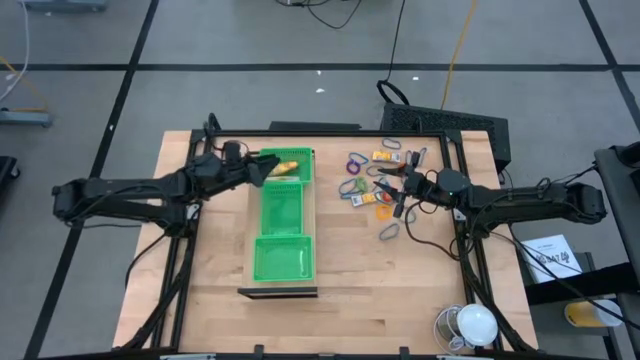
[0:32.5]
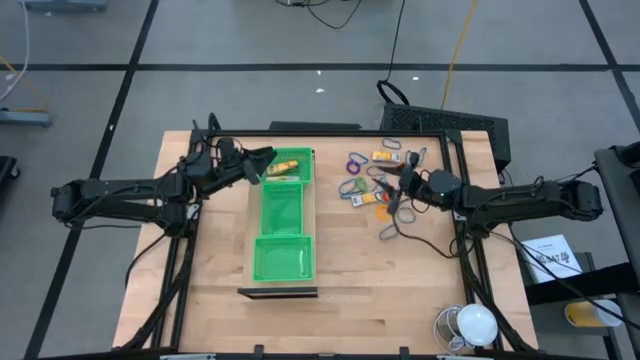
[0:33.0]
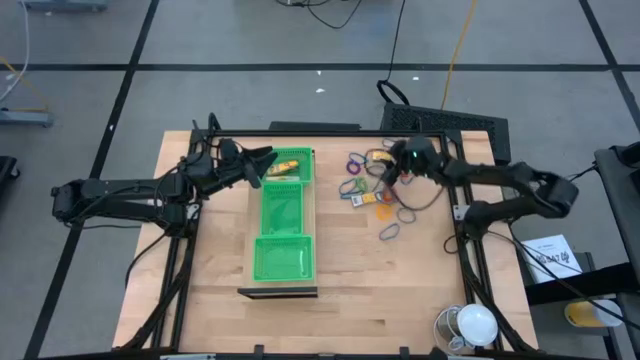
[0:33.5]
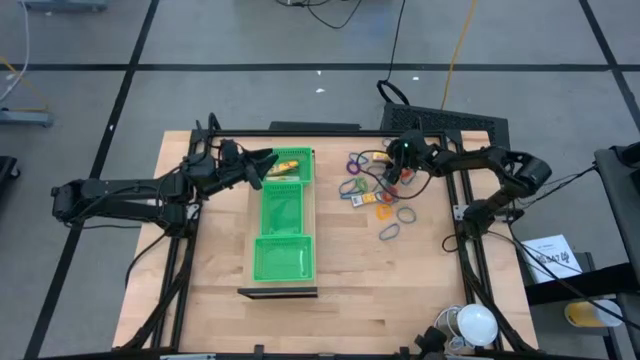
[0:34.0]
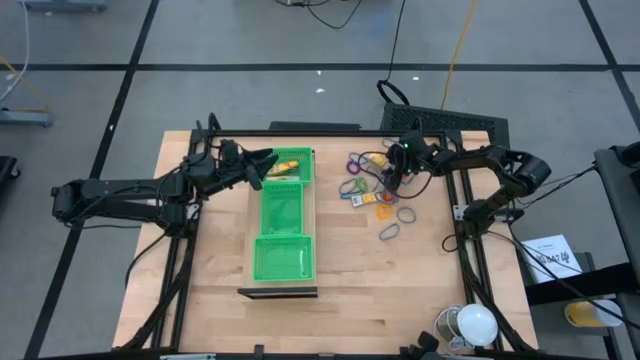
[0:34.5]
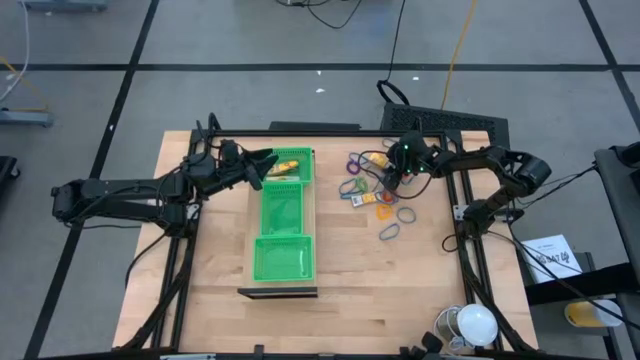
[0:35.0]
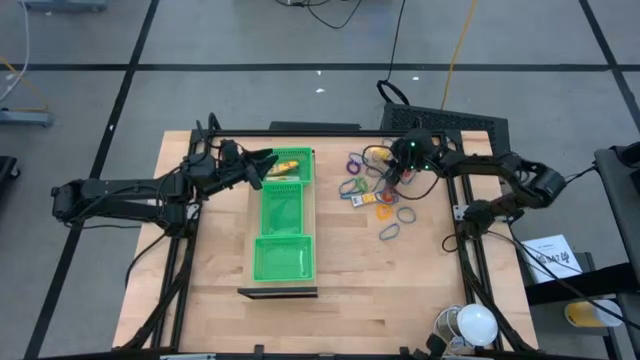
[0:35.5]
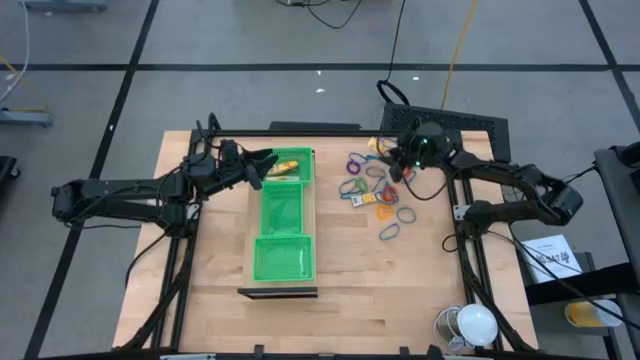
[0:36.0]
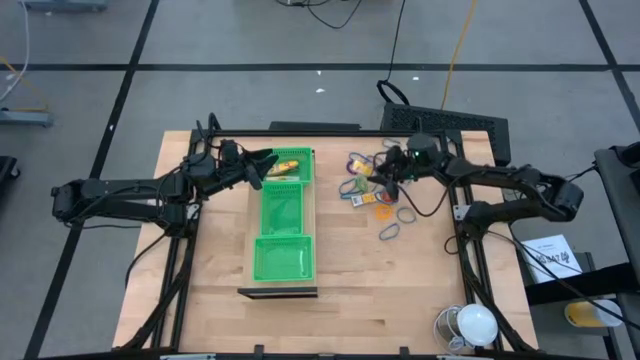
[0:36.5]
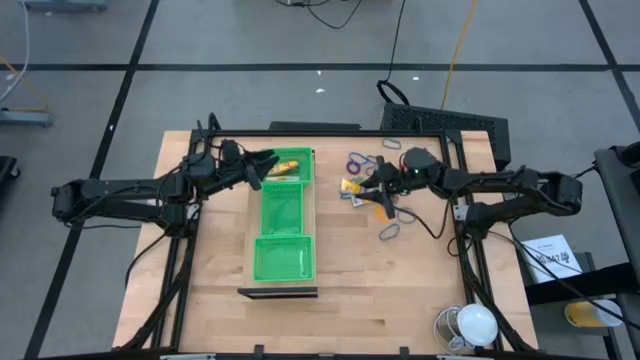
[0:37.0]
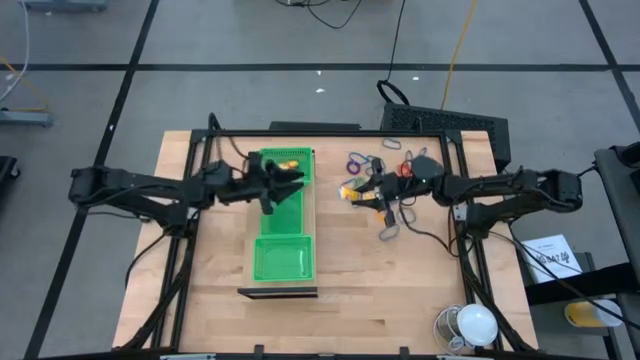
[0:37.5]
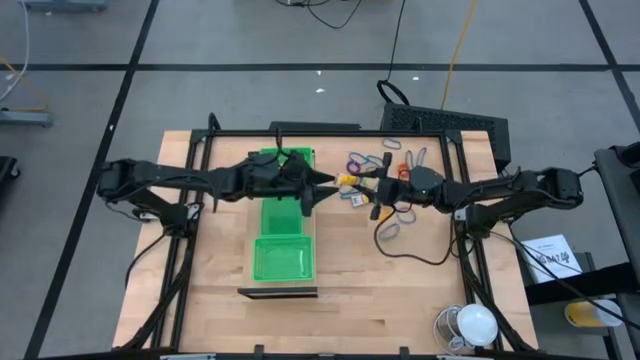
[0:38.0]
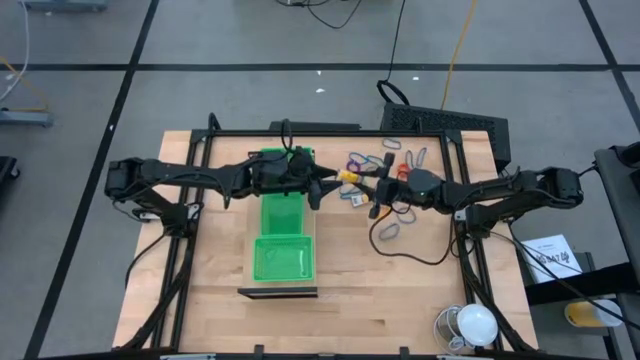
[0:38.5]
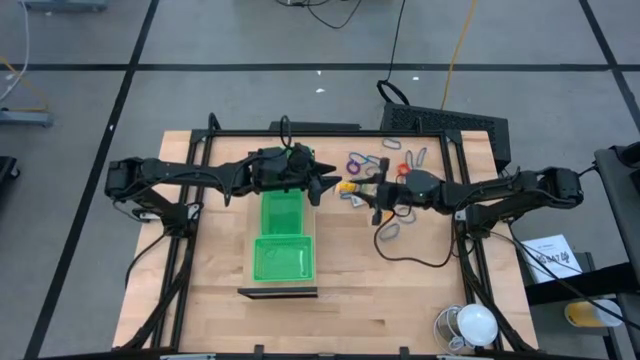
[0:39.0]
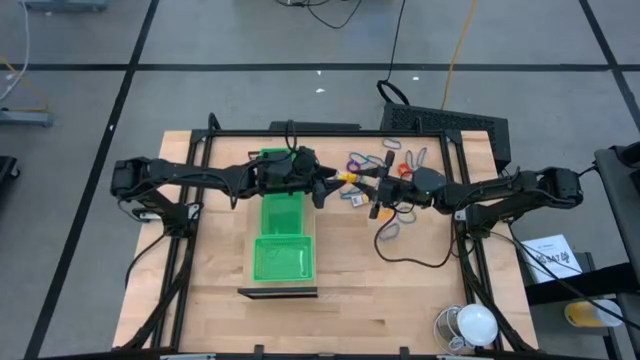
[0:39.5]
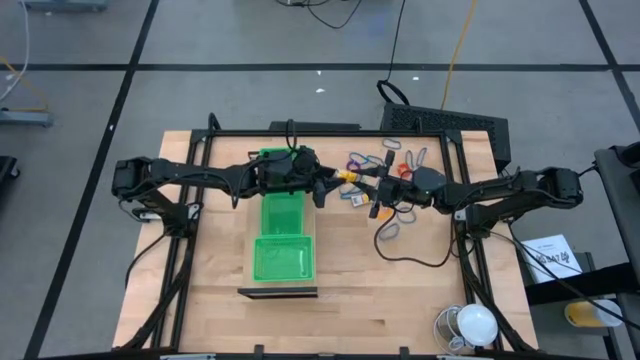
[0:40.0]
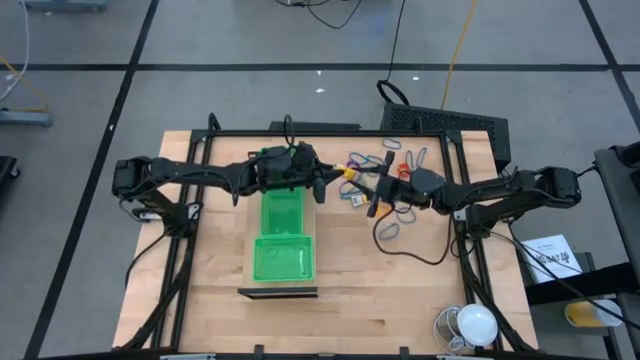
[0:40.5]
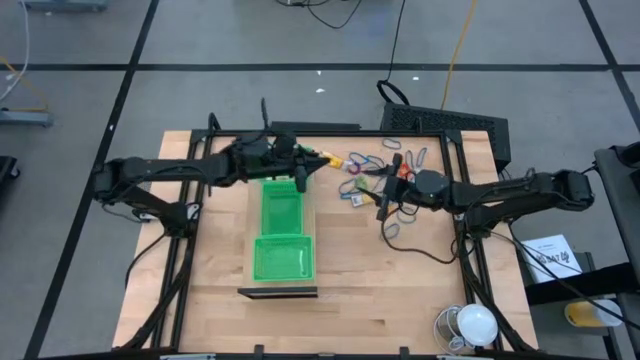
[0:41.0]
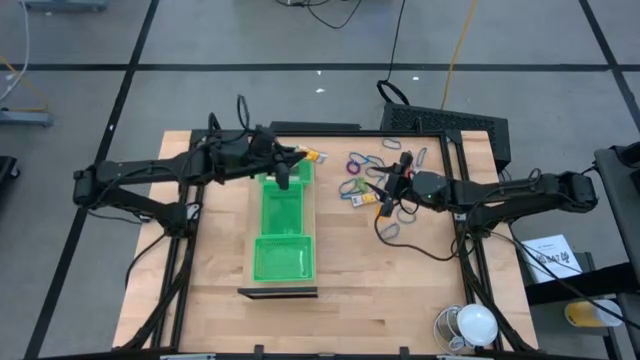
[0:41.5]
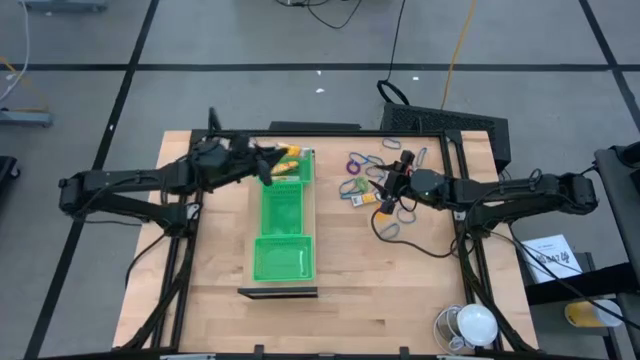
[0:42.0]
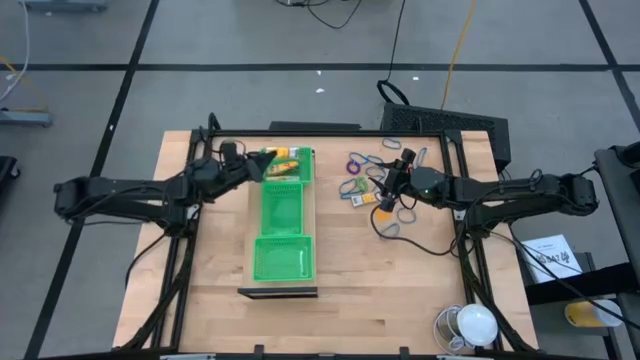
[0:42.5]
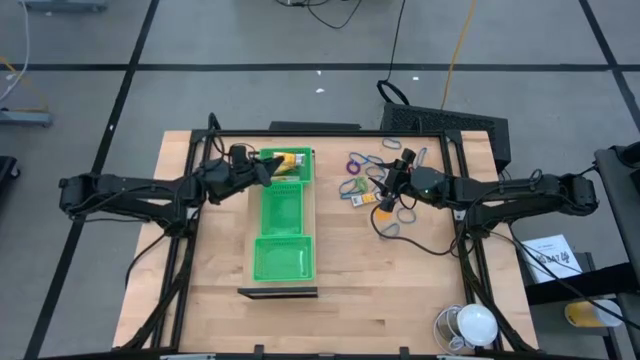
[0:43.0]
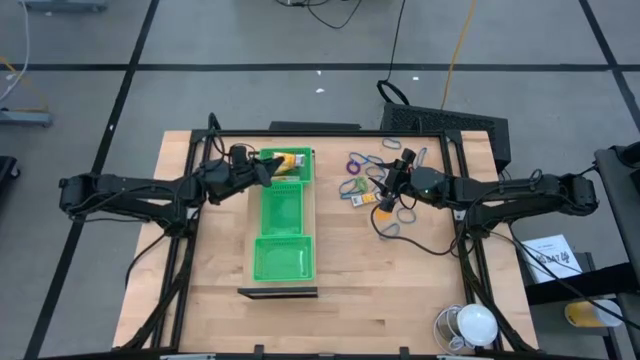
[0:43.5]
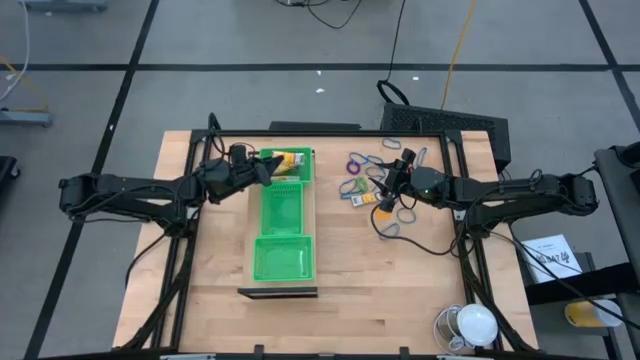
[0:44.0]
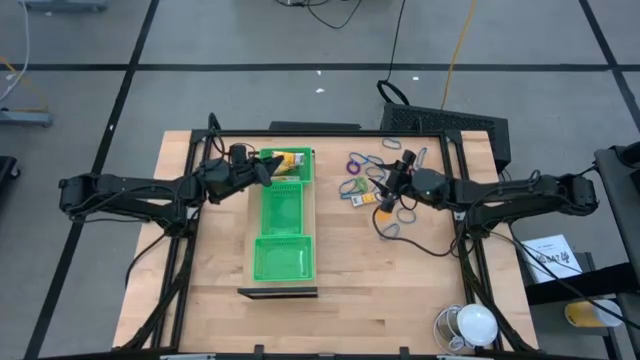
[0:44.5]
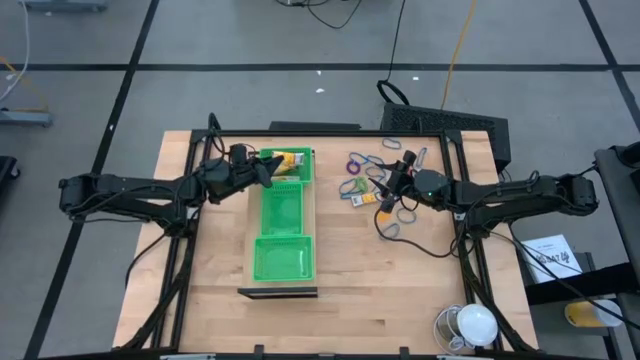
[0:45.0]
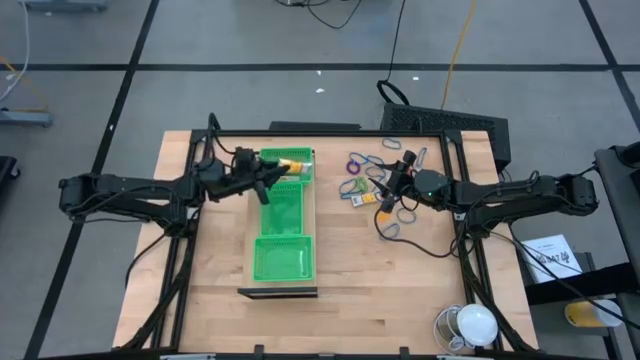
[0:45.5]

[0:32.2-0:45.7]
Task: Pick & Place Office Desk Supplies
Put the yellow crayon box into the top green bin on the shelf

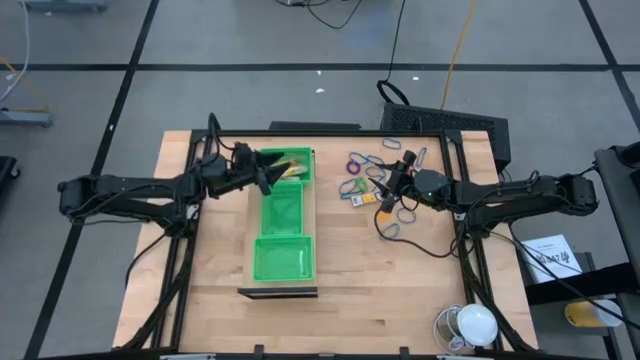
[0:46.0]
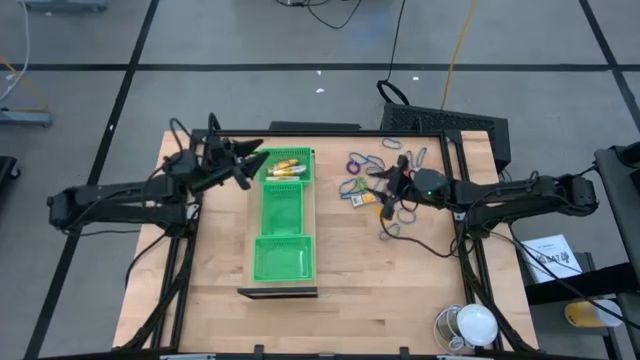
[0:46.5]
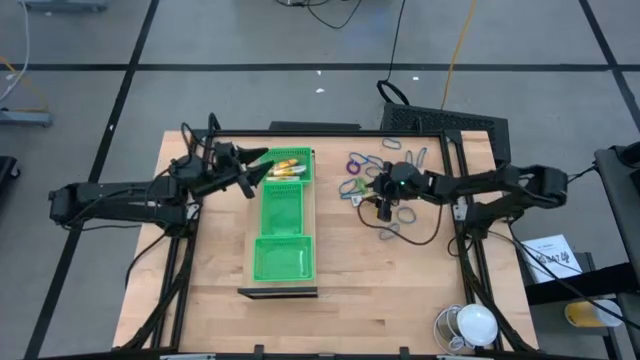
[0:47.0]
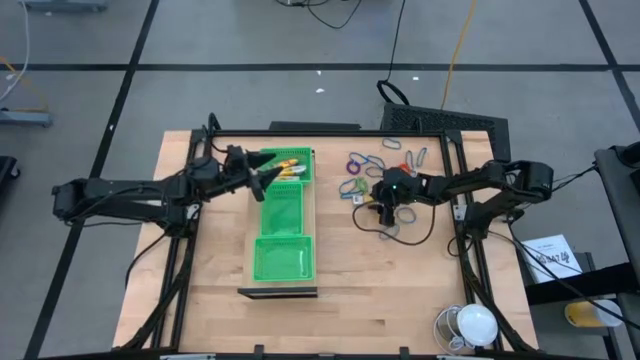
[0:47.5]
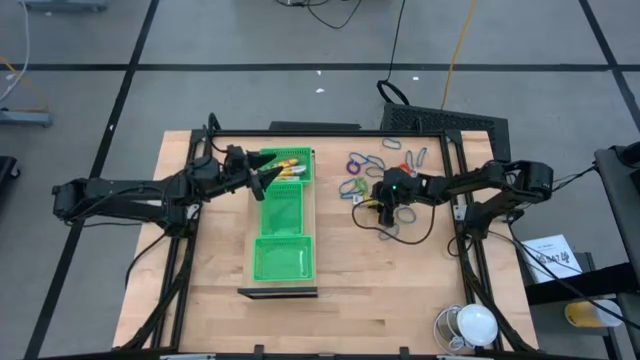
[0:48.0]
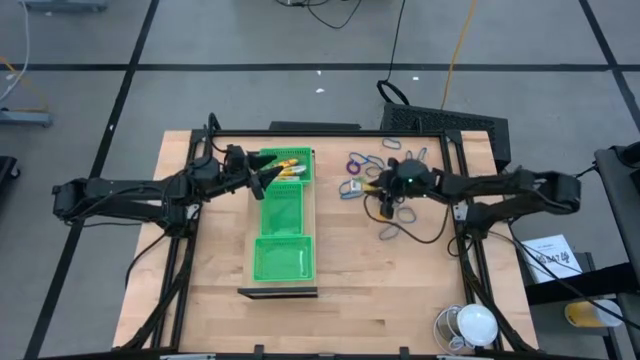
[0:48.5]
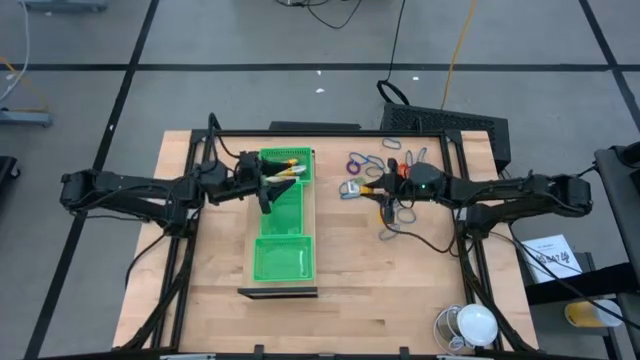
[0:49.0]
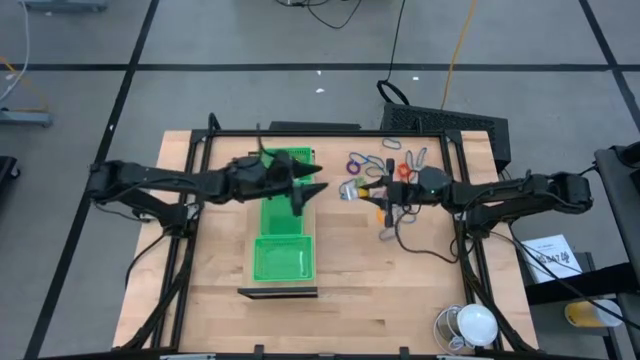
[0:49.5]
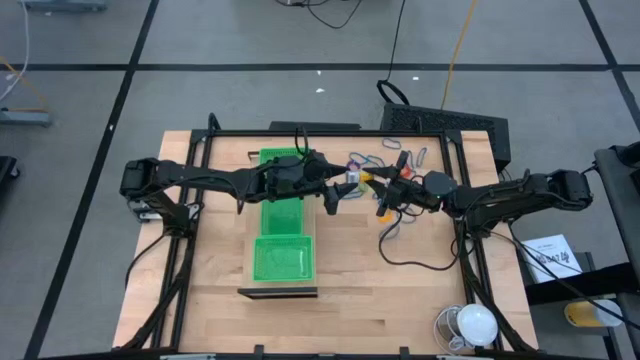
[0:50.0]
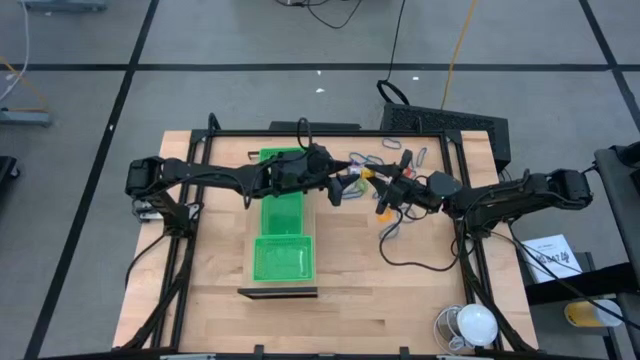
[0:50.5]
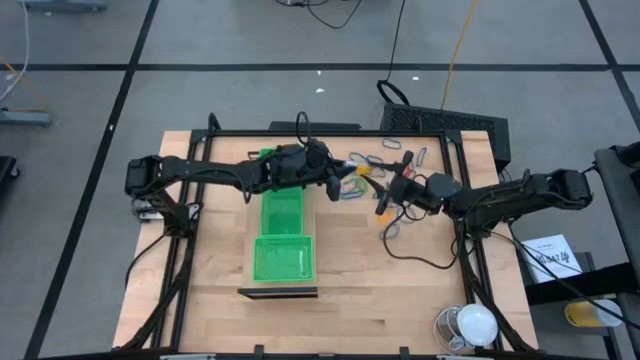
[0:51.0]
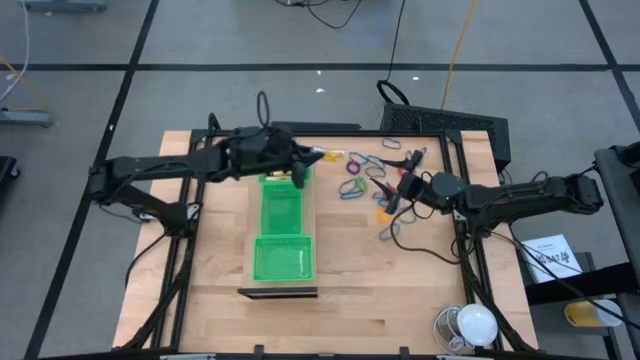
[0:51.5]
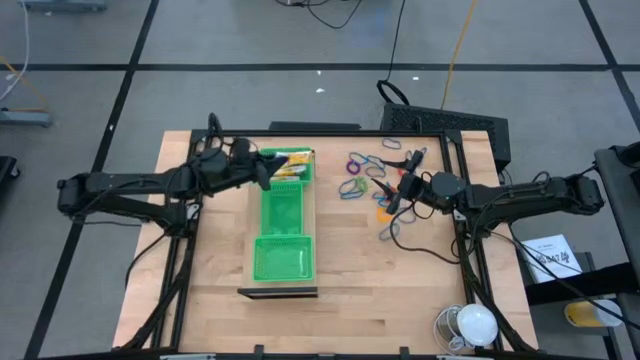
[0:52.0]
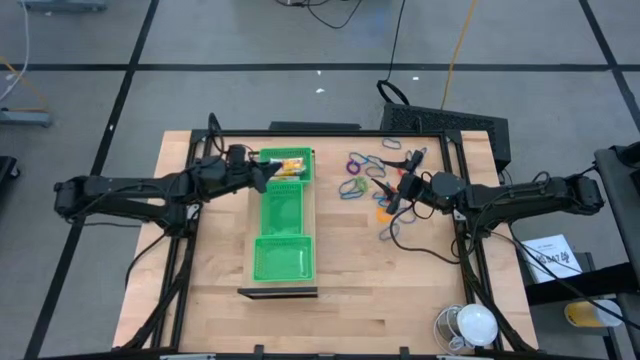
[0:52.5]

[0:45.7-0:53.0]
Put the yellow crayon box into the top green bin on the shelf

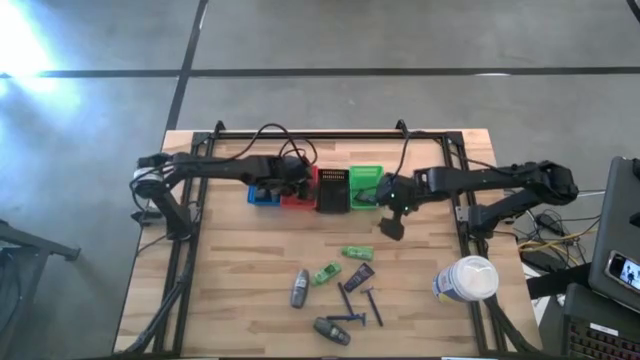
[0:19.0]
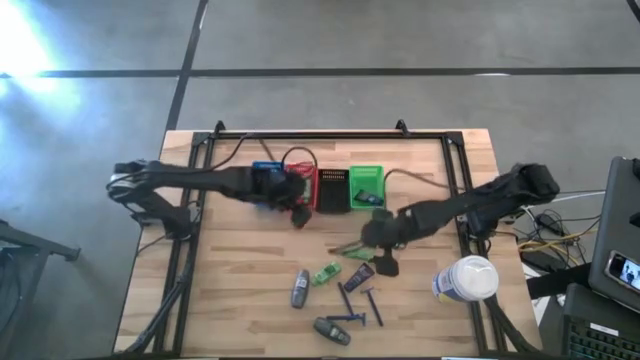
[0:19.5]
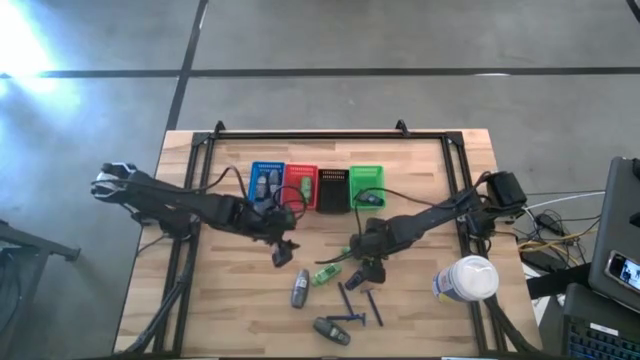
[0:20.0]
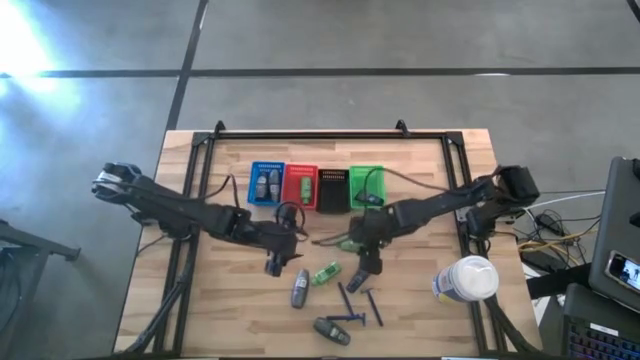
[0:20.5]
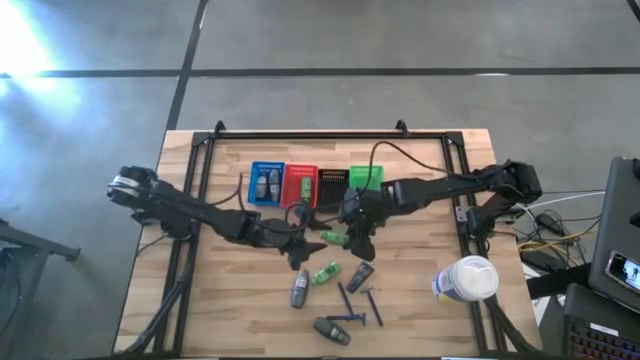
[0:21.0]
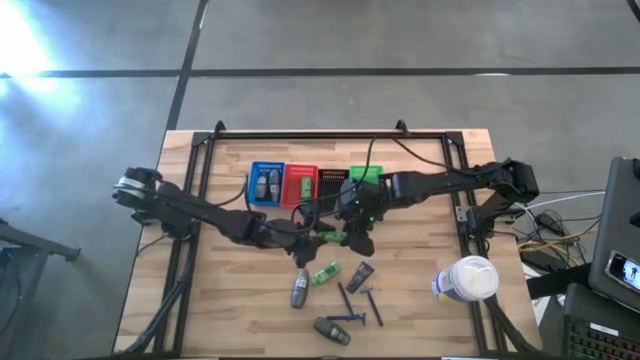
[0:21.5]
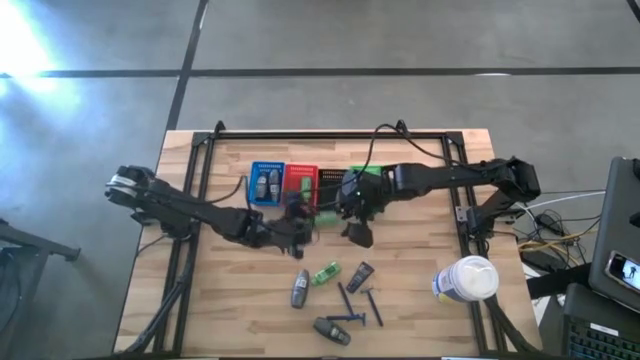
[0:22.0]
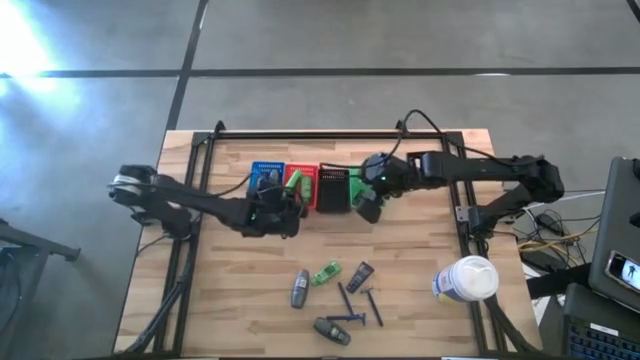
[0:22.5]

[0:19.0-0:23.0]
Task: Pick & Place Travel size toiletries
Put the right shampoo into the red basket
